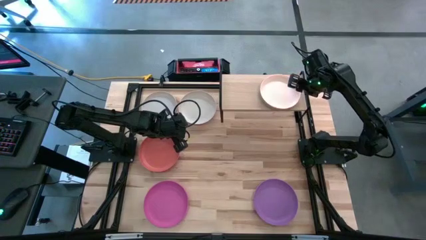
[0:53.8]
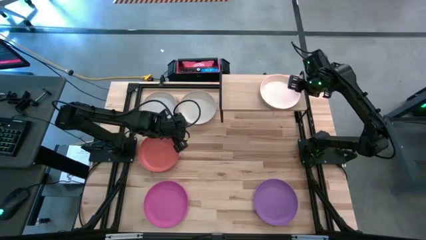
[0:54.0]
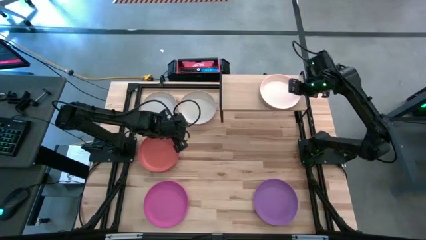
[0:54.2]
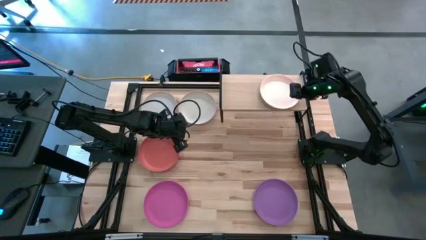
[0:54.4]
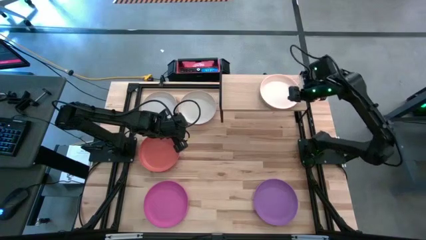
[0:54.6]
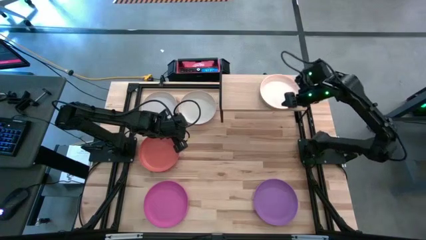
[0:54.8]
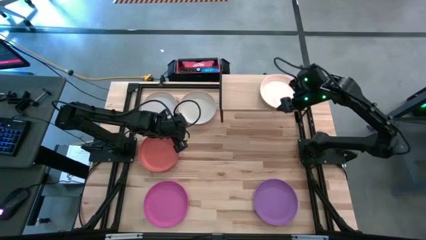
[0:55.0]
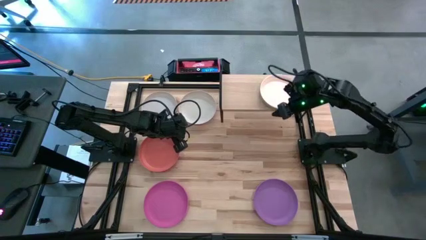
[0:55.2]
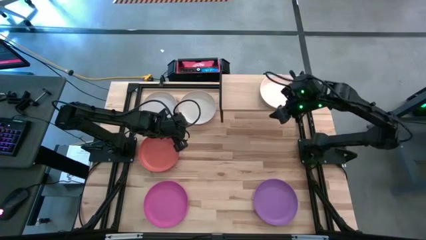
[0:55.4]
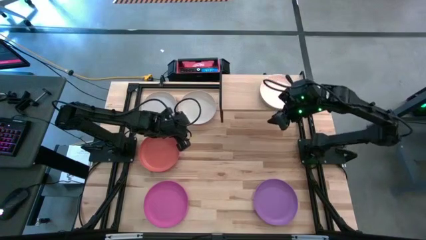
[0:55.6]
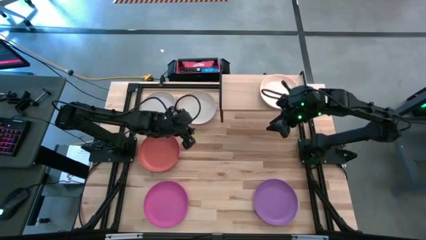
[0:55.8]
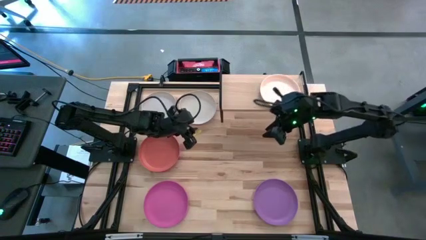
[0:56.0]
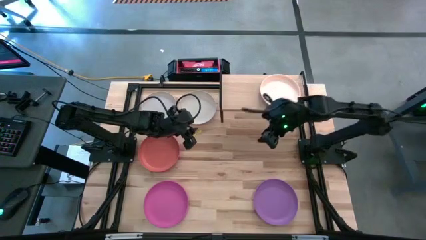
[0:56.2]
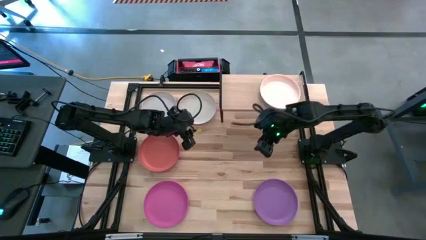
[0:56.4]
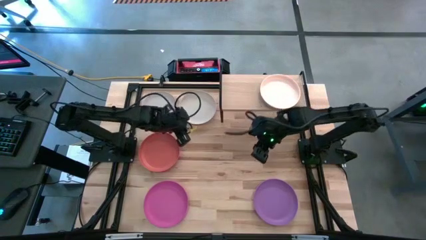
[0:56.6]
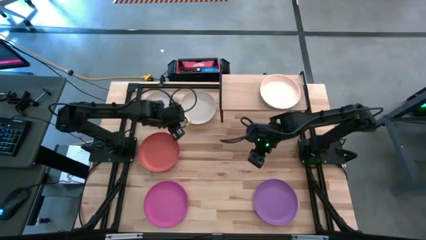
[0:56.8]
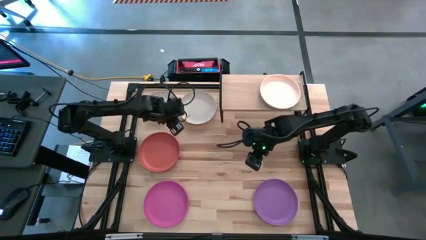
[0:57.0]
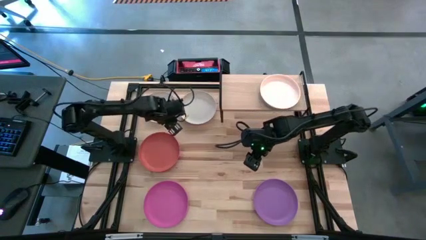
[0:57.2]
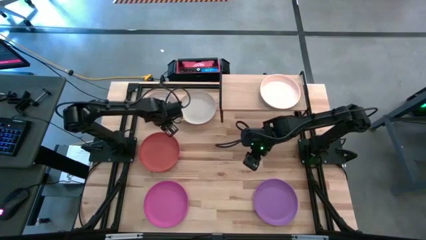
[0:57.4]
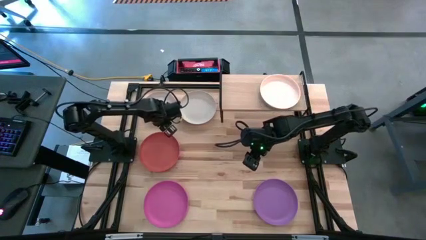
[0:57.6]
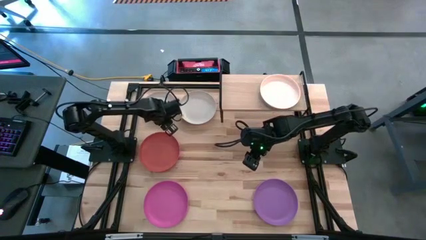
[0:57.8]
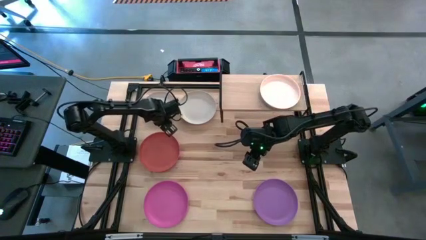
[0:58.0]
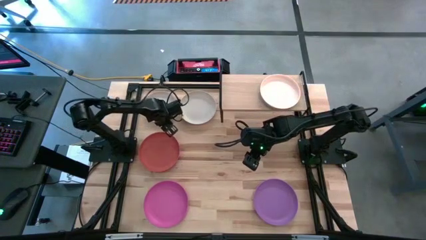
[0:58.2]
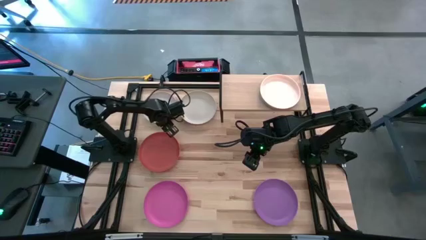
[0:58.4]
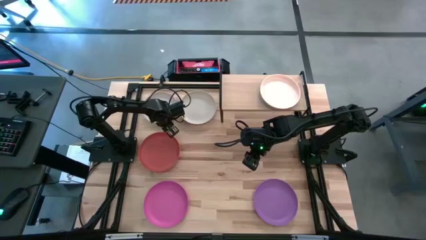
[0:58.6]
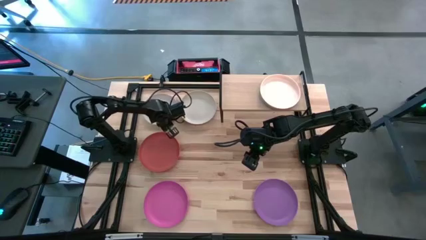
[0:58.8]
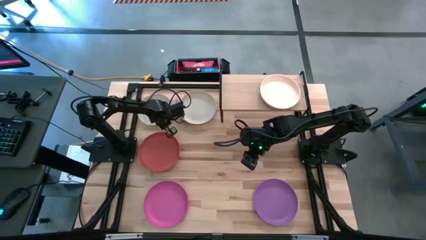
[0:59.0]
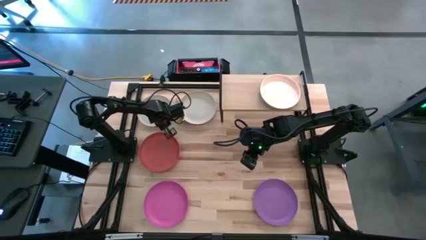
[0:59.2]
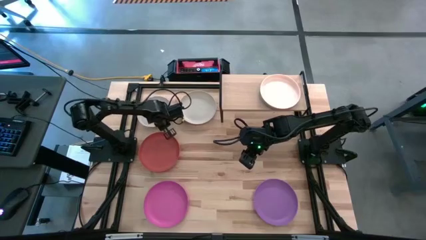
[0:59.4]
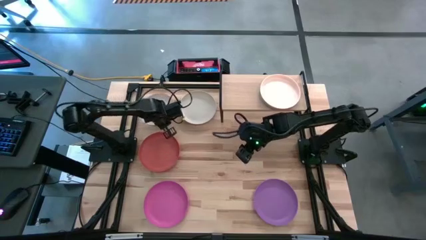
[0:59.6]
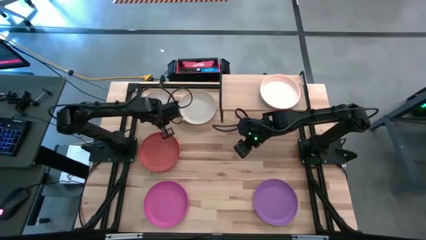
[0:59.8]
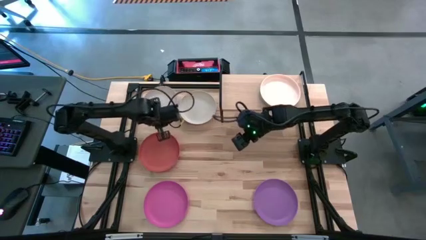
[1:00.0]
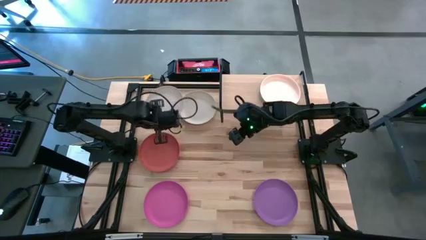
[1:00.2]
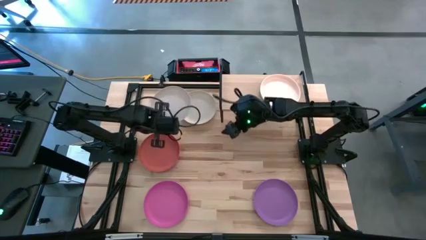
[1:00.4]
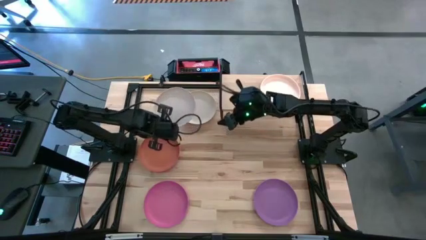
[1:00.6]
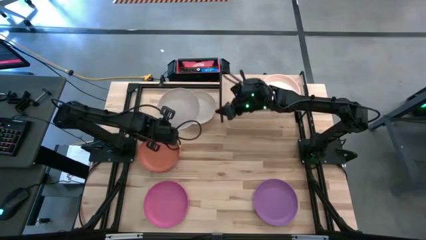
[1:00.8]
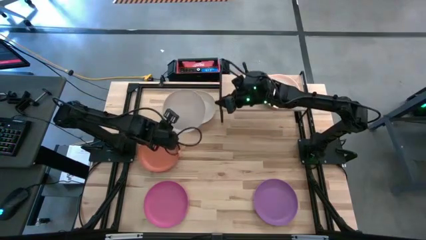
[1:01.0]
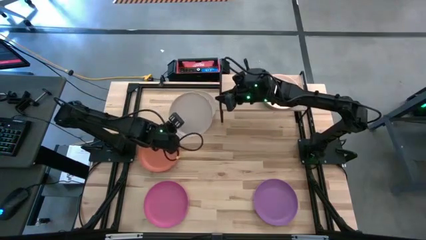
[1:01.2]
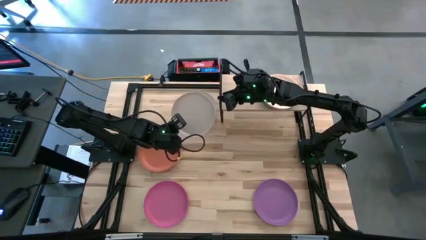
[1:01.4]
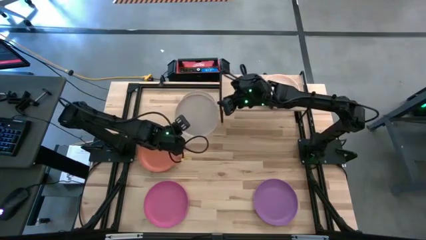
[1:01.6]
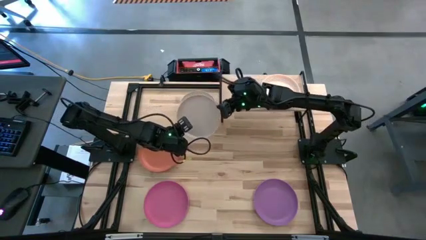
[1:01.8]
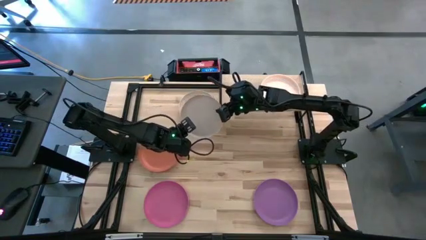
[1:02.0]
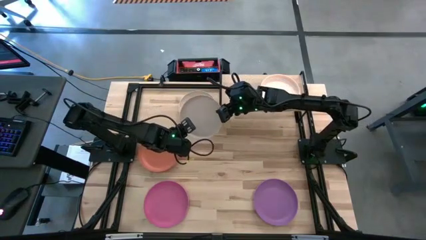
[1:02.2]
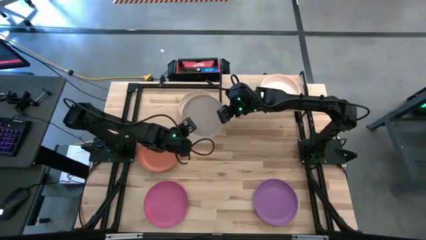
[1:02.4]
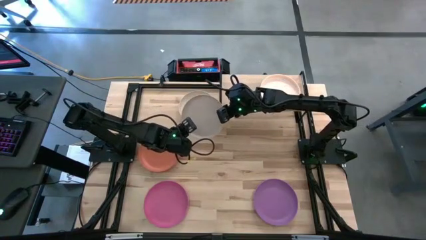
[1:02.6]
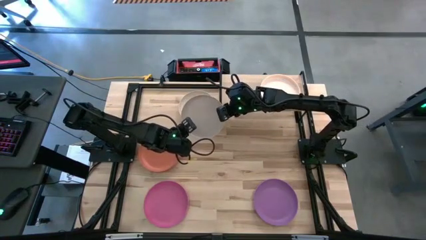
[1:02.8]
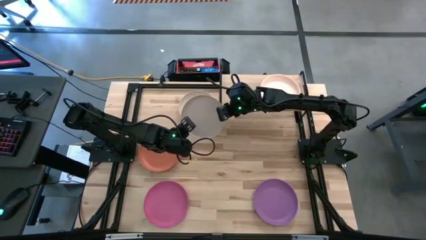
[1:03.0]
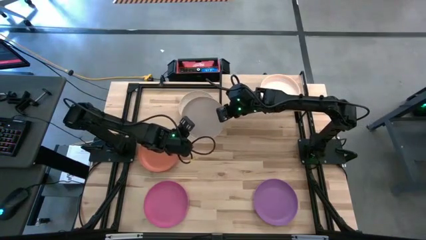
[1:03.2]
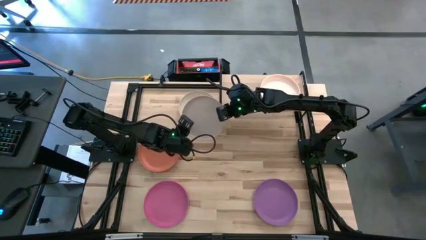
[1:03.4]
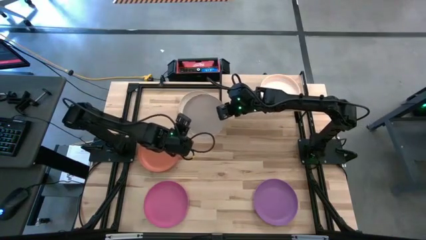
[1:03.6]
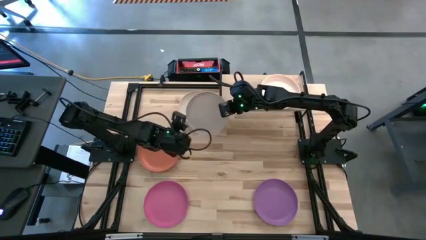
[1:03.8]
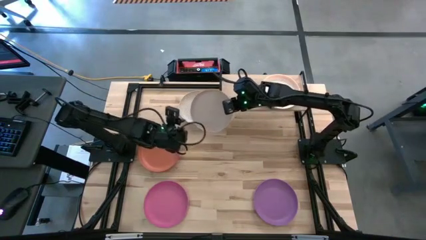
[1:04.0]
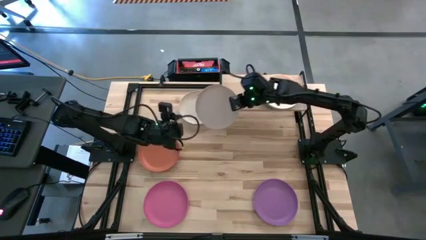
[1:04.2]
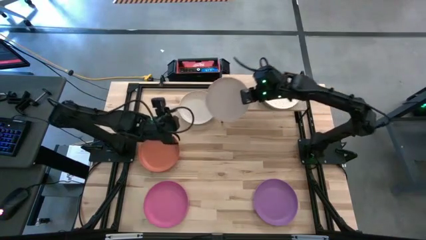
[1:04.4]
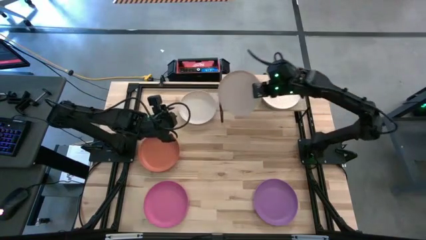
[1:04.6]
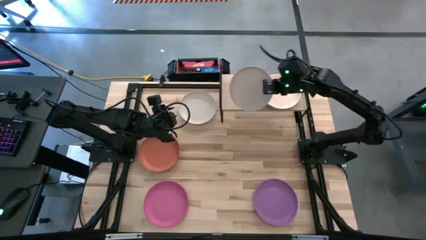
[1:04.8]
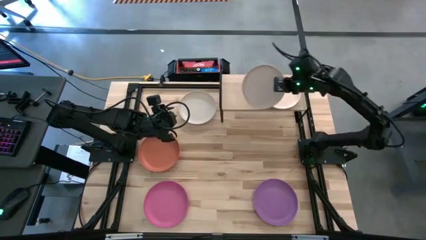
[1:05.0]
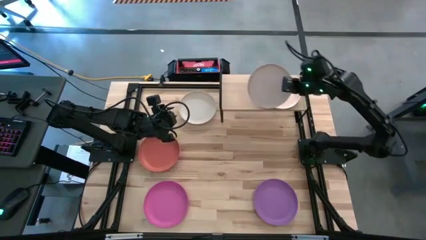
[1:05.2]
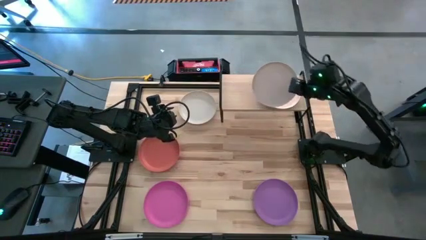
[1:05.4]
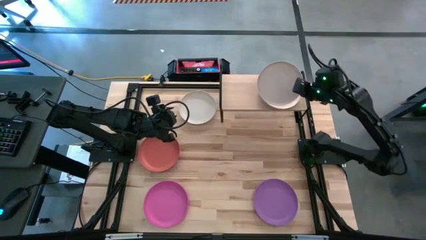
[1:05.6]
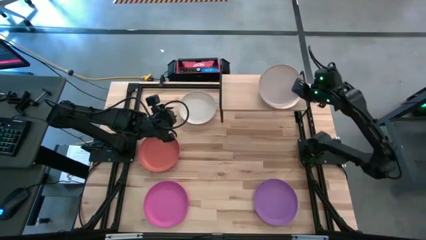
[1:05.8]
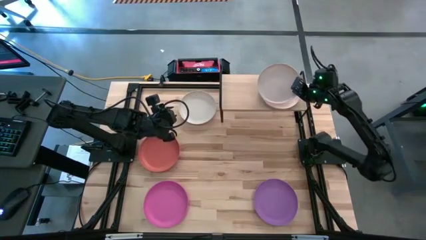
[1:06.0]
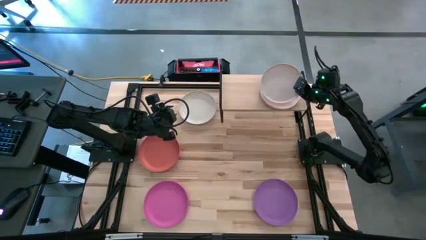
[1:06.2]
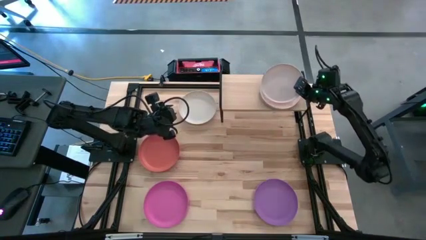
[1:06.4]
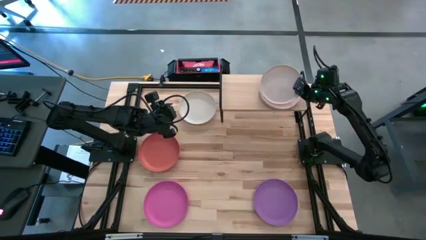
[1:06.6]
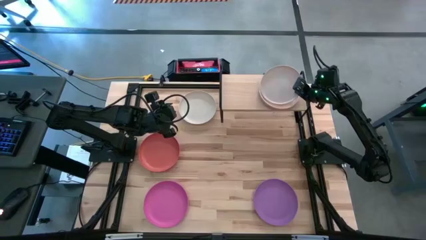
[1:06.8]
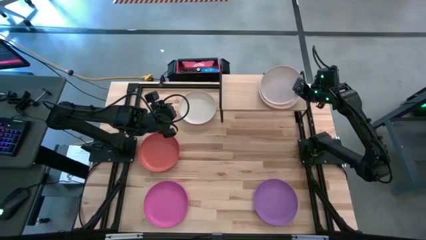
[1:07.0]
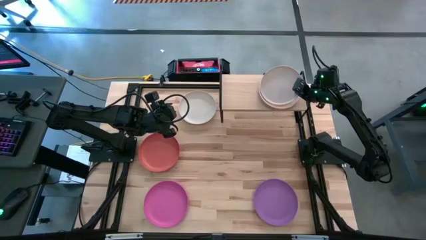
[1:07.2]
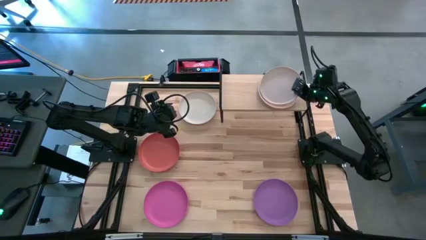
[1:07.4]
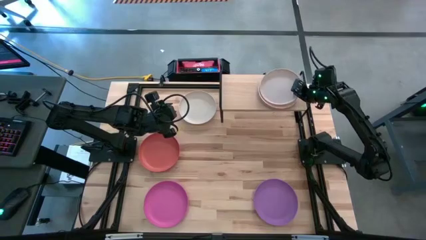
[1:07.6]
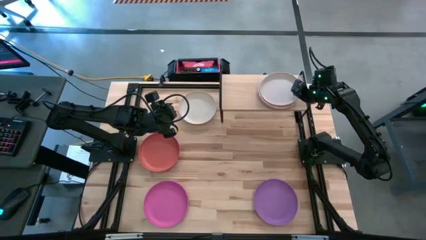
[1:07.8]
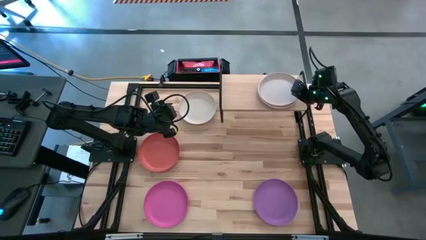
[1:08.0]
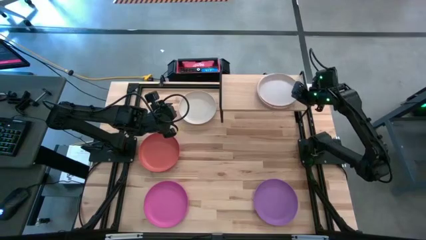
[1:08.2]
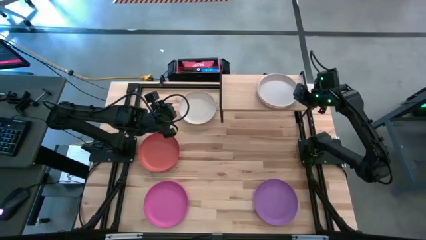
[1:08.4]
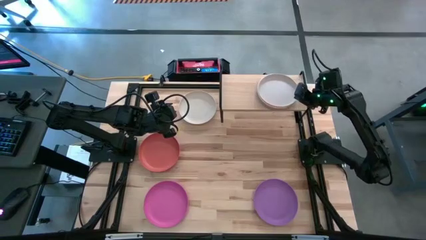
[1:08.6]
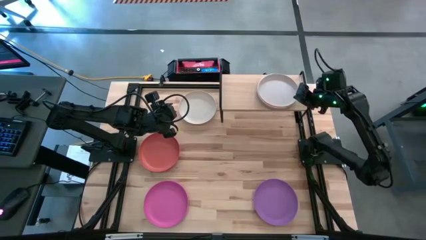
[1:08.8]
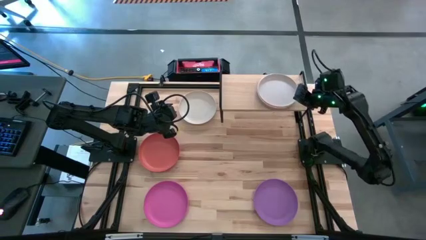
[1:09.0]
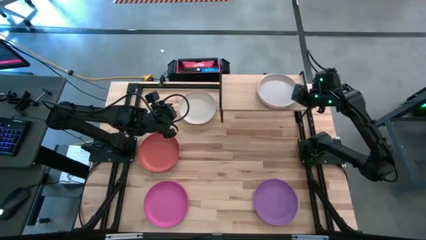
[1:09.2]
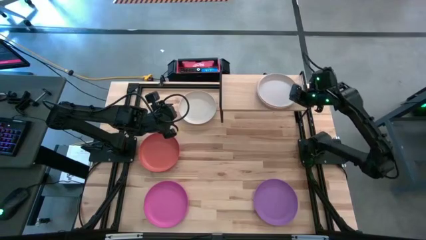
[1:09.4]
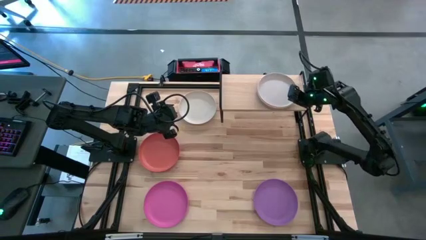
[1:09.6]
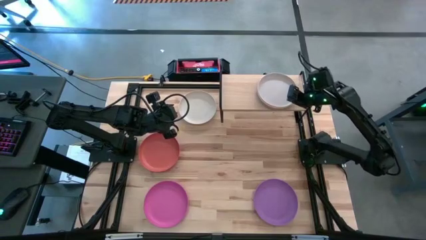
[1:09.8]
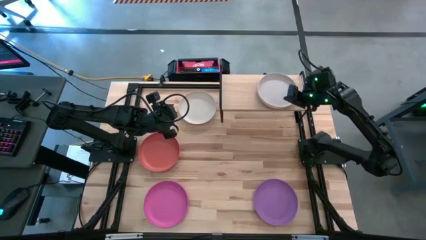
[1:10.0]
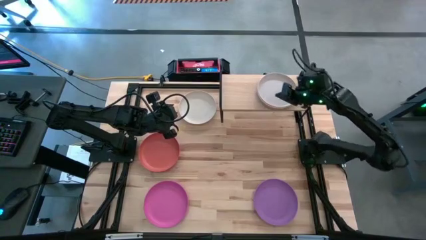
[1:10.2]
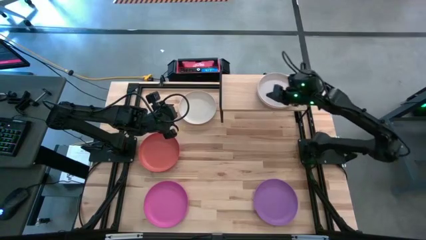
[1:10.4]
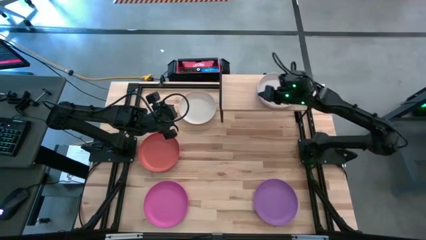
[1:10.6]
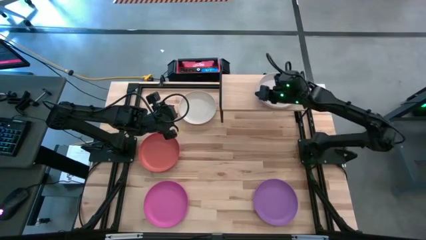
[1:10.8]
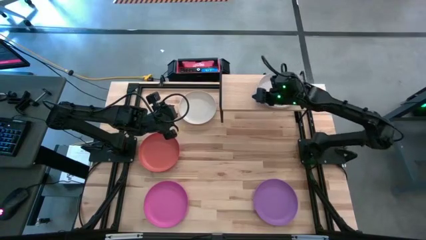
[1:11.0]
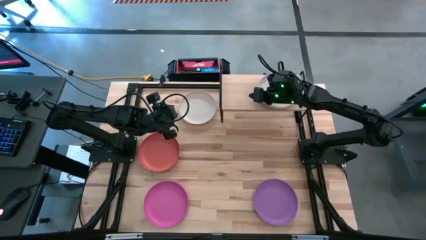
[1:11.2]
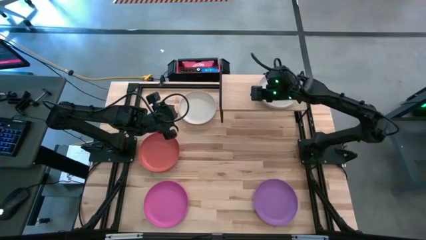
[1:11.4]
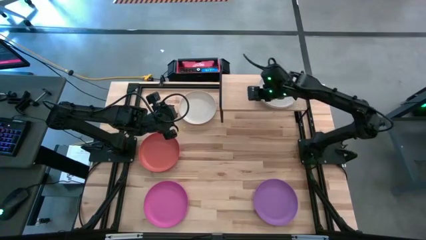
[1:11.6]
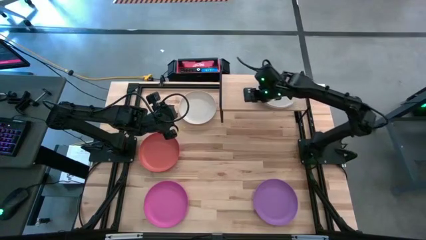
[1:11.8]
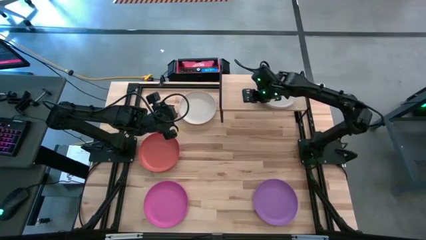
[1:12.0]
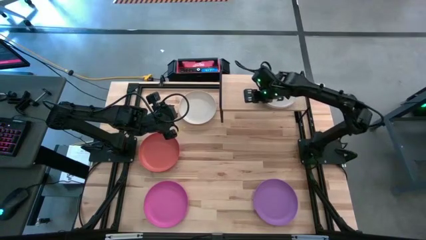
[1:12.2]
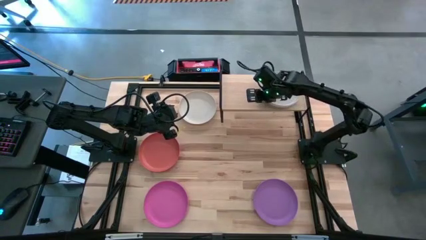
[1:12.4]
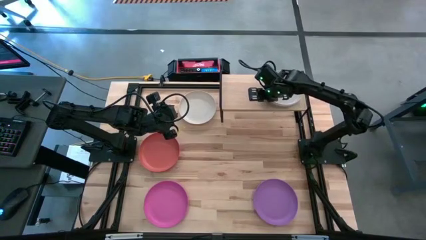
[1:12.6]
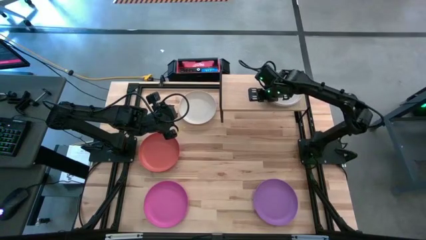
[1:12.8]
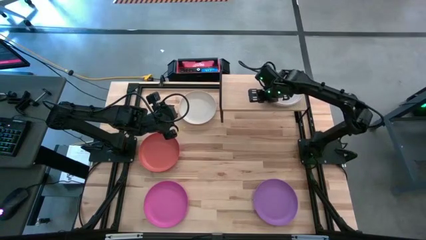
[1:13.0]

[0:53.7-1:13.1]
Task: Place and stack plates onto a shelf
Stack the gray plate on top of the light orange plate on the shelf
